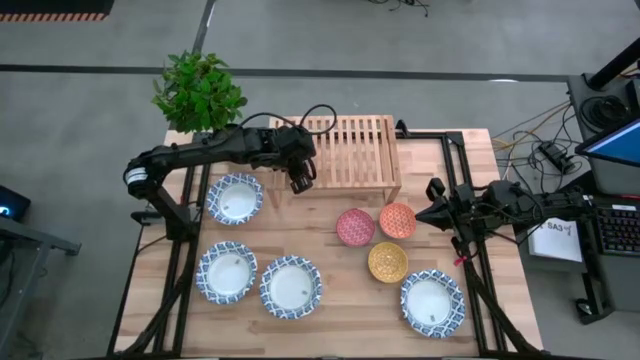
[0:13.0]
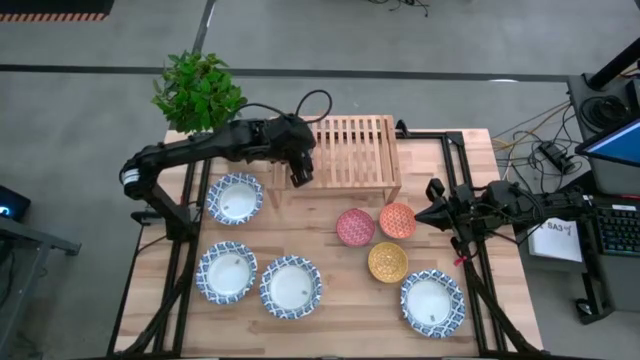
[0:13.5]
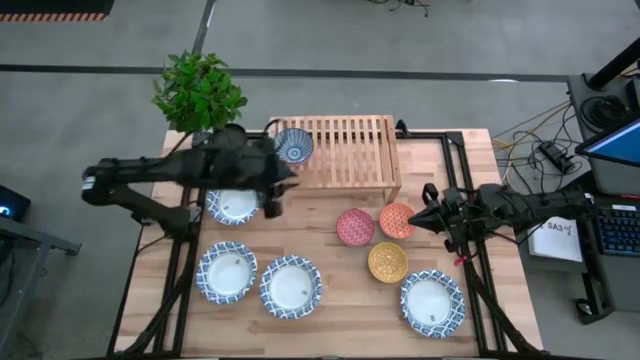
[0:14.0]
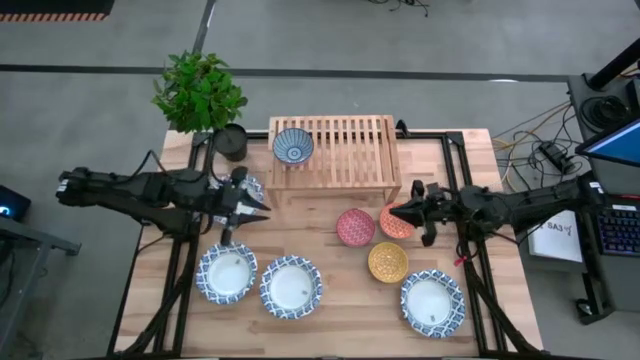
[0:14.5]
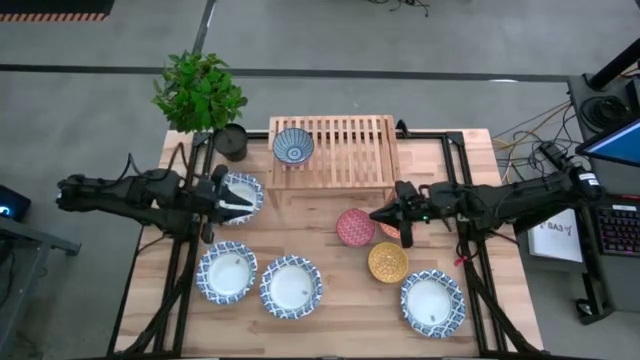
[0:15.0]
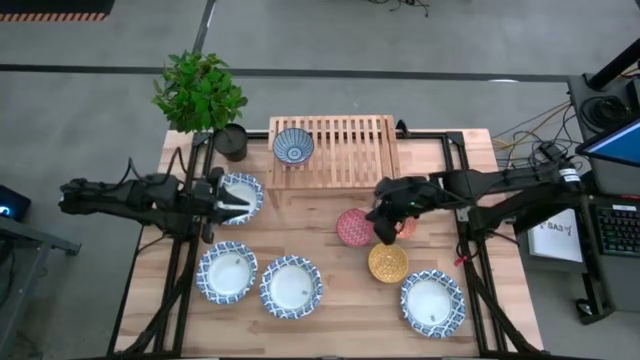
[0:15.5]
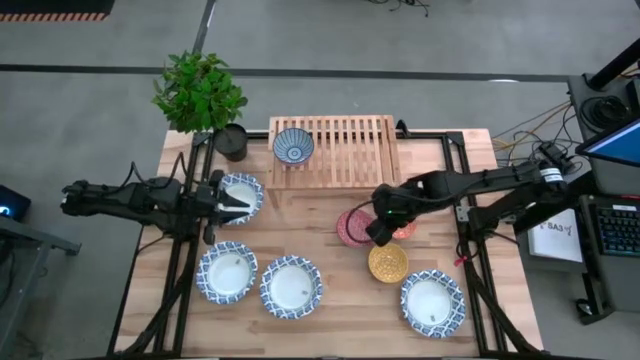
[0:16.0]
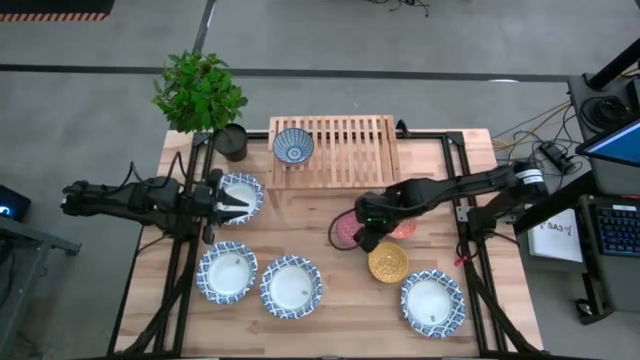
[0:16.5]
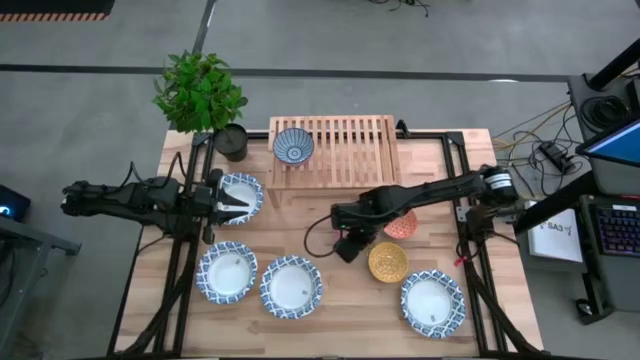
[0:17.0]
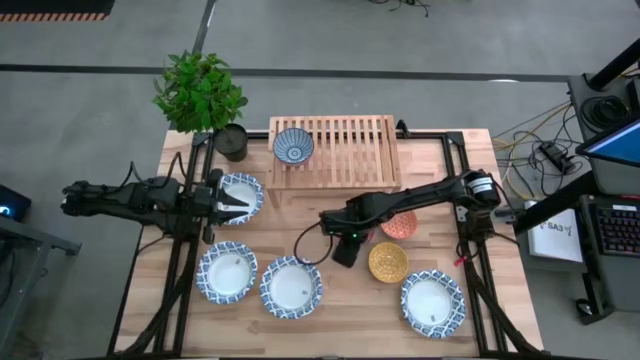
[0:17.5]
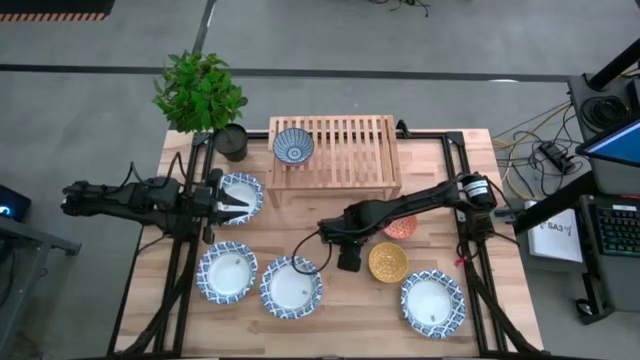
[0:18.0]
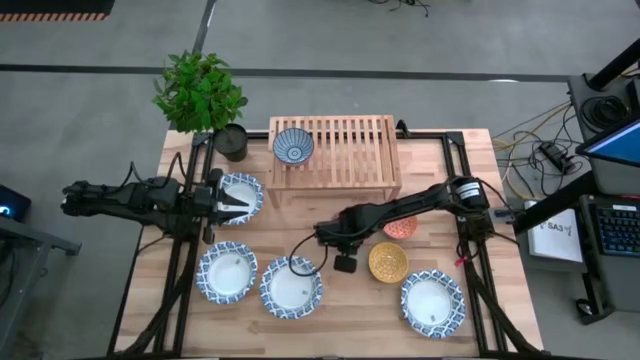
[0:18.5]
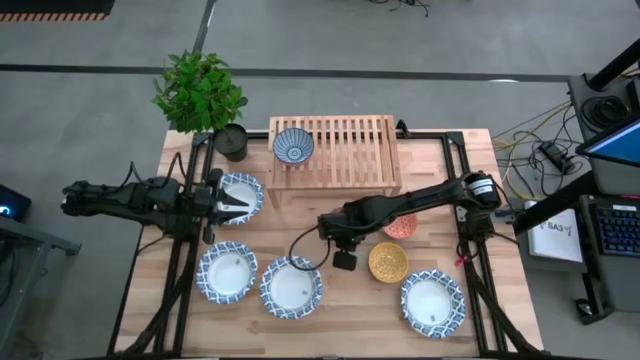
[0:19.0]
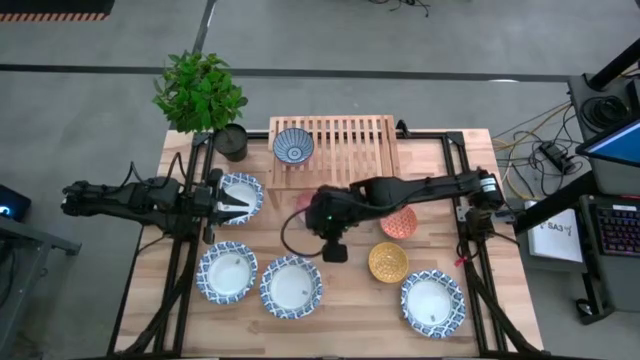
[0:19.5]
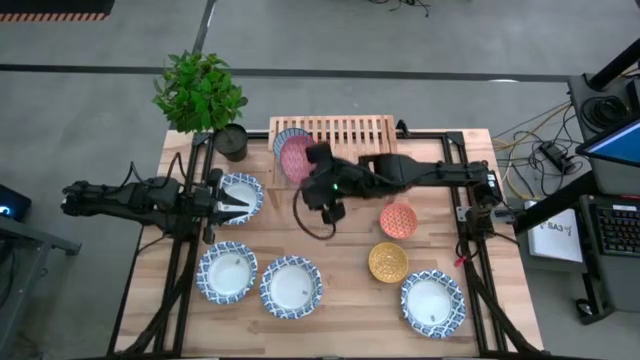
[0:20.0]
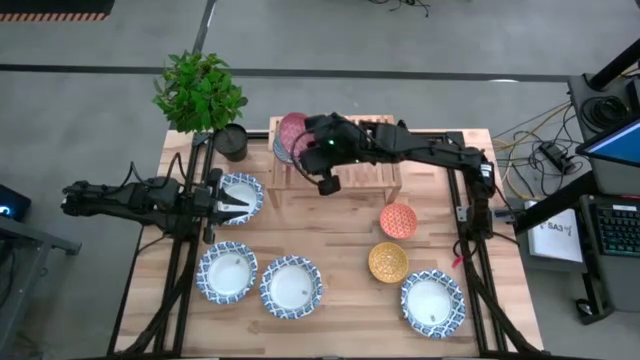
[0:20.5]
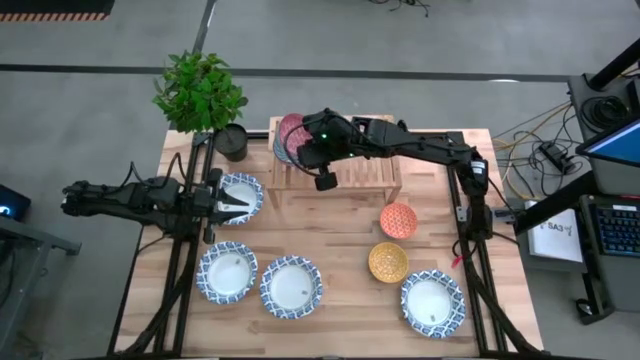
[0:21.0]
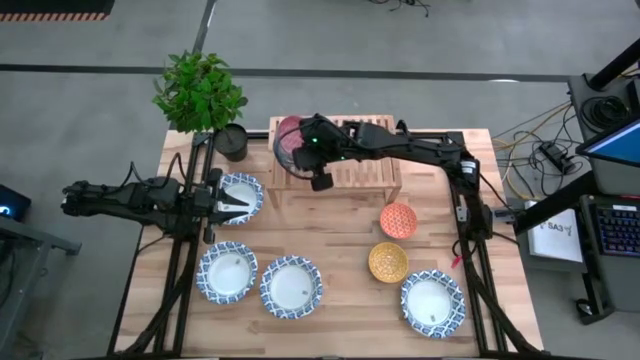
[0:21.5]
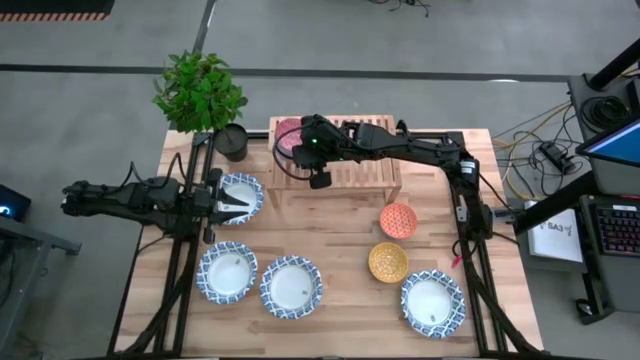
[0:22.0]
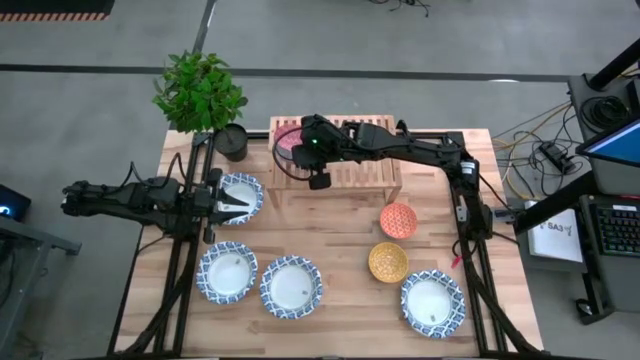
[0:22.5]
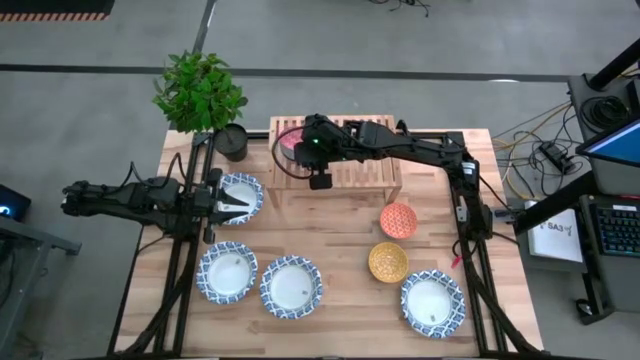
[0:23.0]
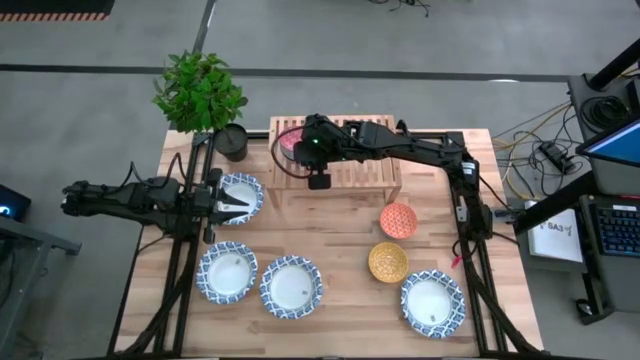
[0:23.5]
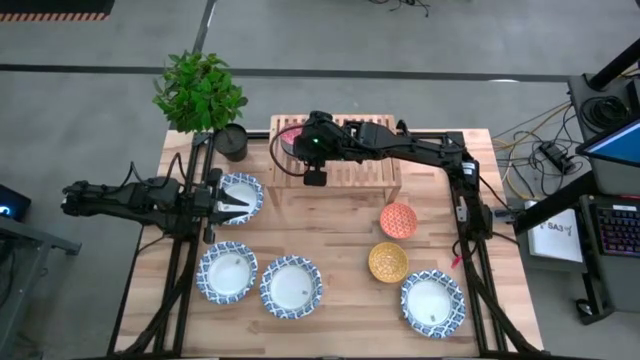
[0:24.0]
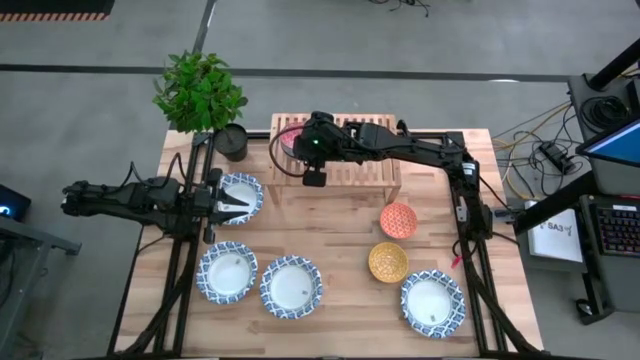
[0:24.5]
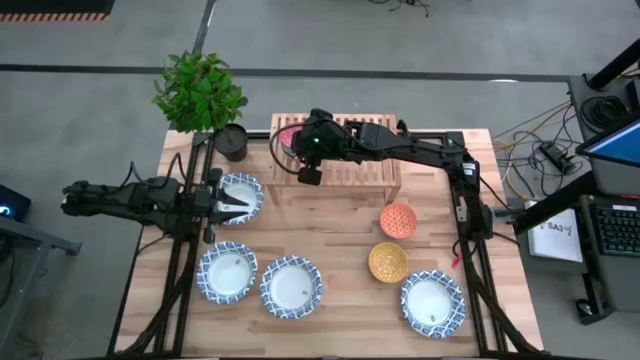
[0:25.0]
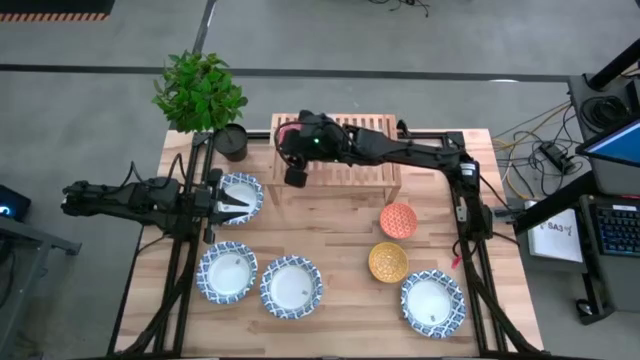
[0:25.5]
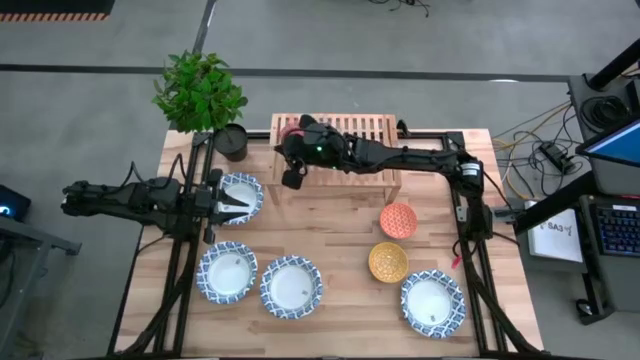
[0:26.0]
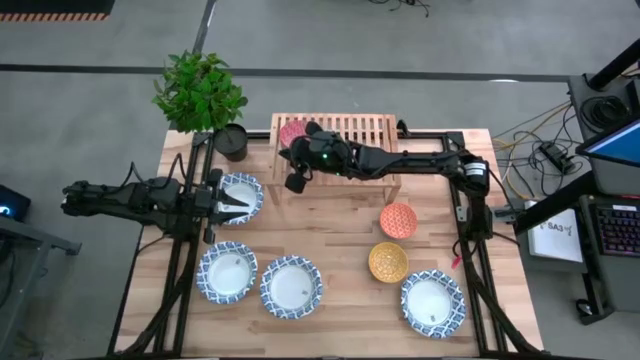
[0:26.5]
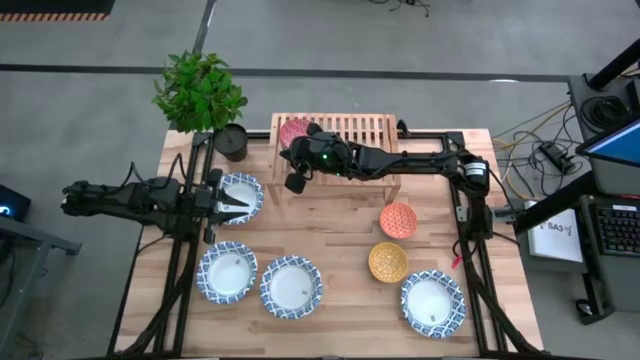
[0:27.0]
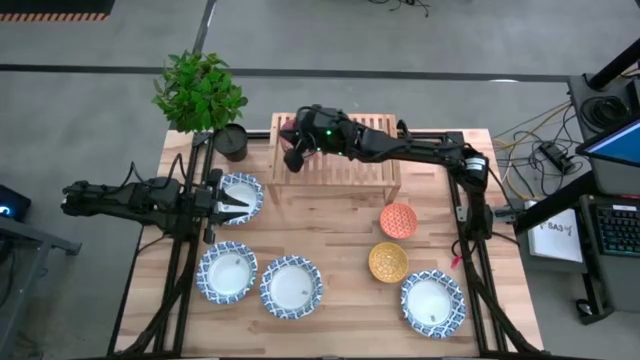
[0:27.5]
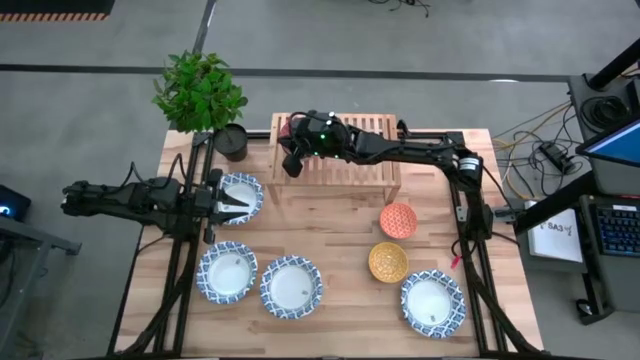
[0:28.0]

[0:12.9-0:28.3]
Task: Place and stack bowls onto a shelf
Stack the red bowl on top of the blue on the shelf

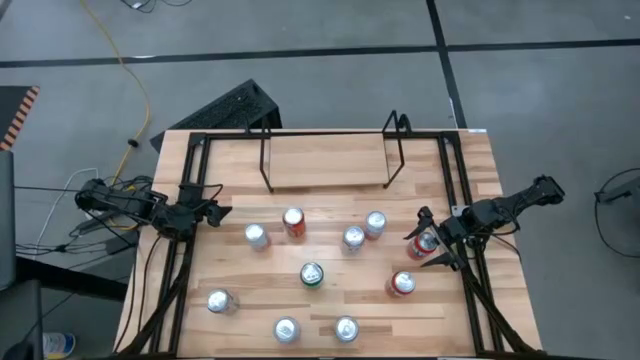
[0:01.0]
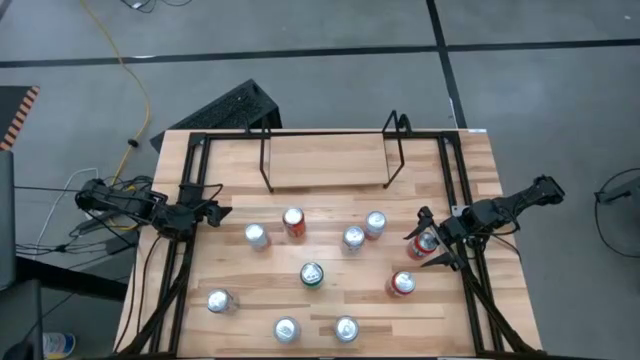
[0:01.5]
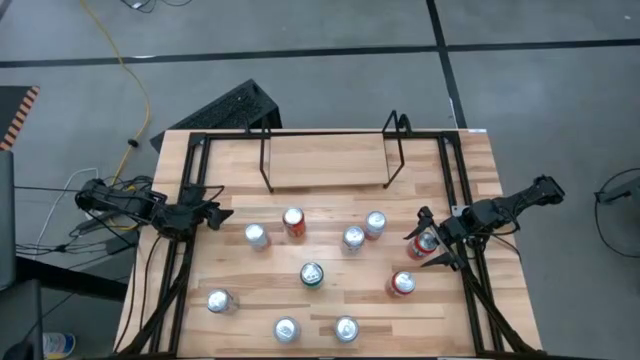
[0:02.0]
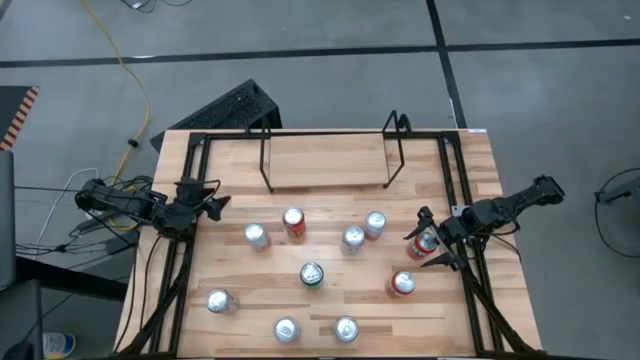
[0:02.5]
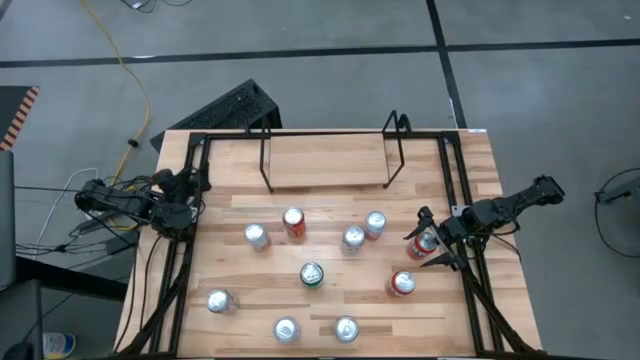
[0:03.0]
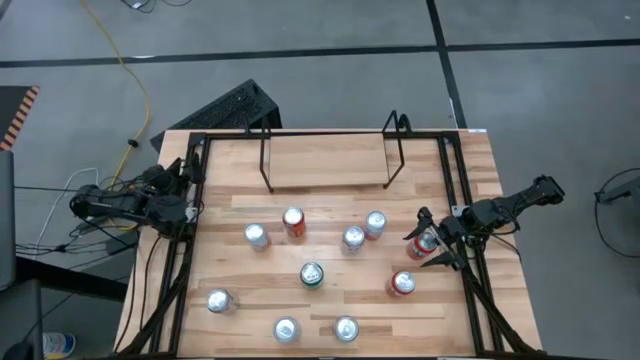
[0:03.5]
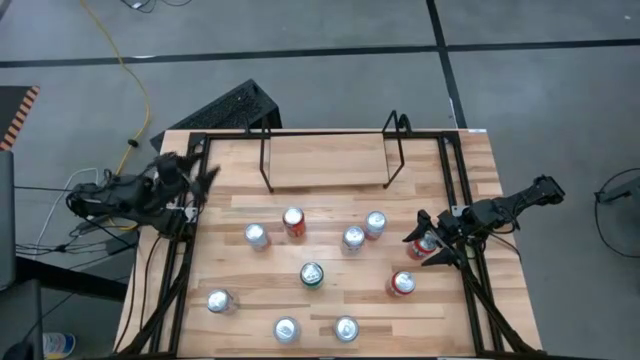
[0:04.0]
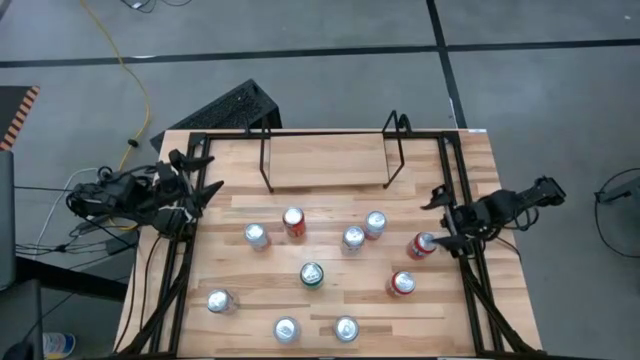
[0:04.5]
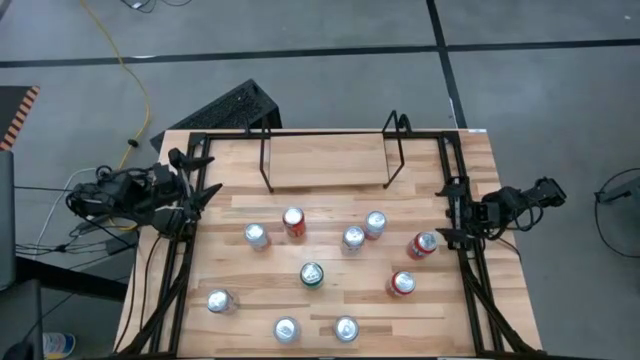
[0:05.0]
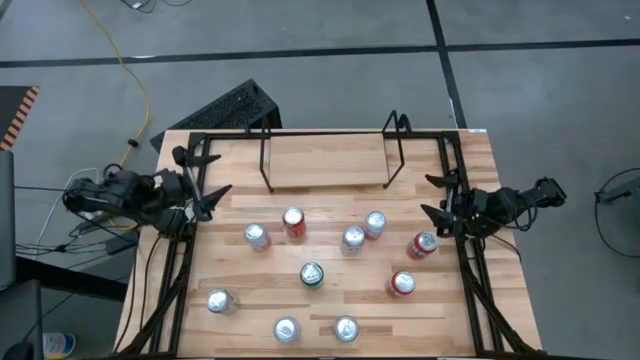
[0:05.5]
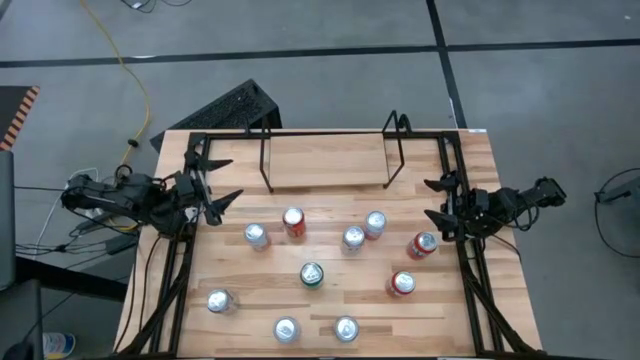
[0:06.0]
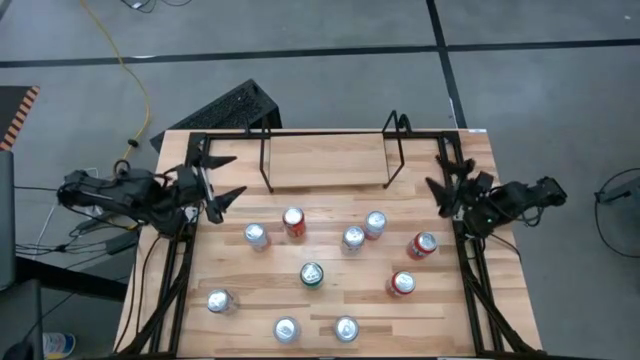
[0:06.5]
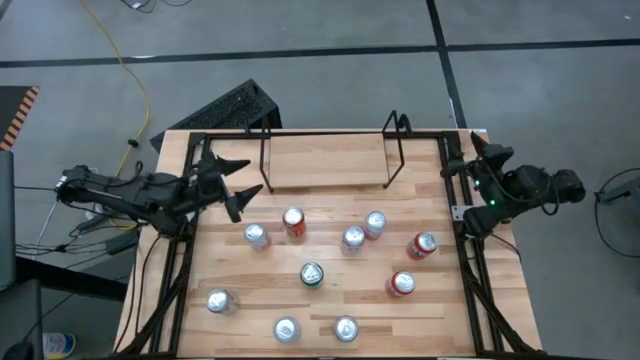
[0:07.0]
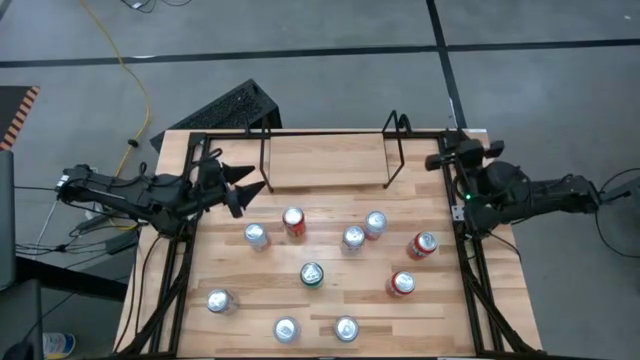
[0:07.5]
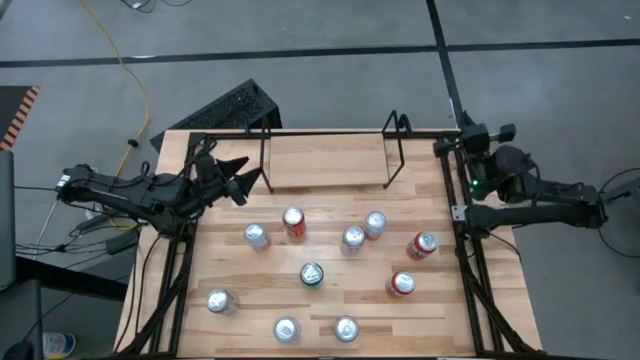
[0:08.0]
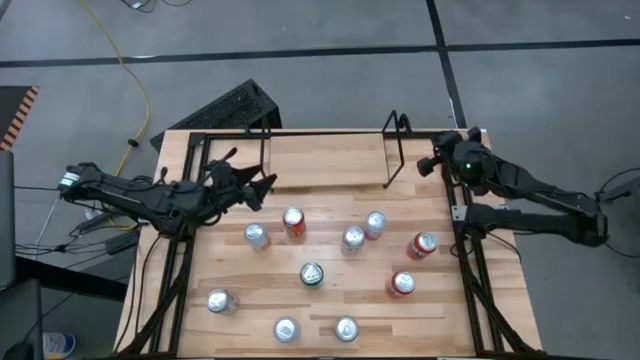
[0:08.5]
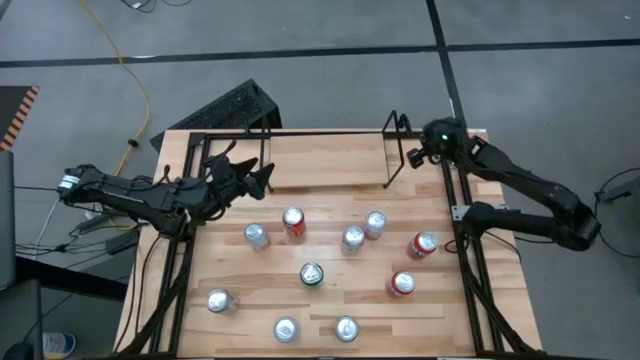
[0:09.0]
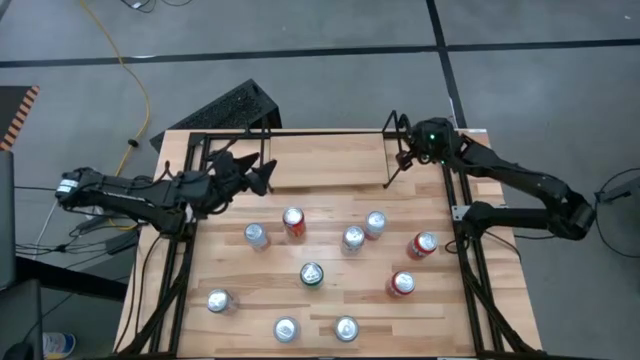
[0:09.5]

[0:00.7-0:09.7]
Task: Place canned beverage on shelf
Adjust the shelf
